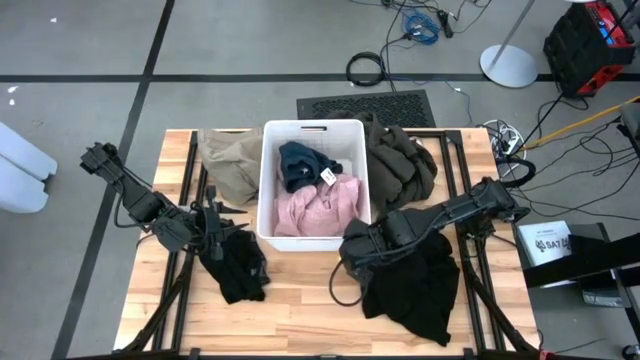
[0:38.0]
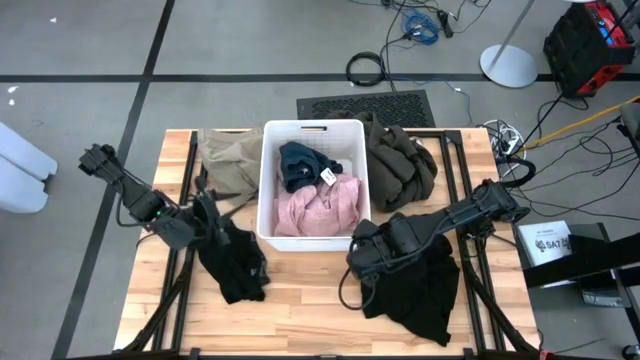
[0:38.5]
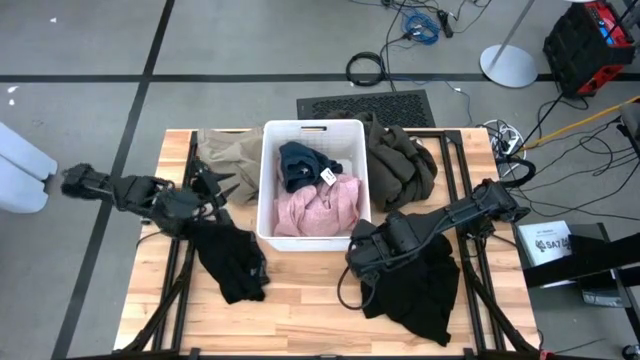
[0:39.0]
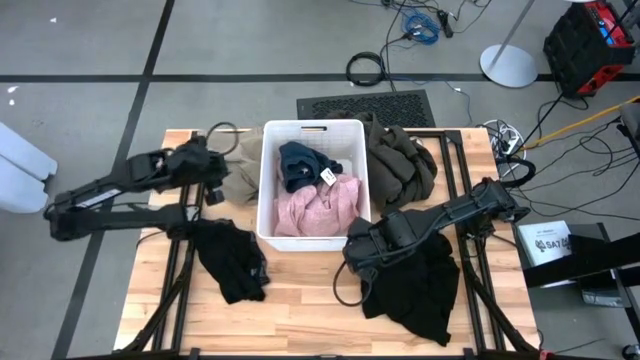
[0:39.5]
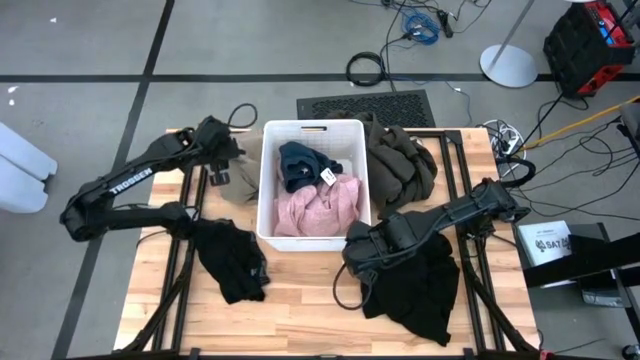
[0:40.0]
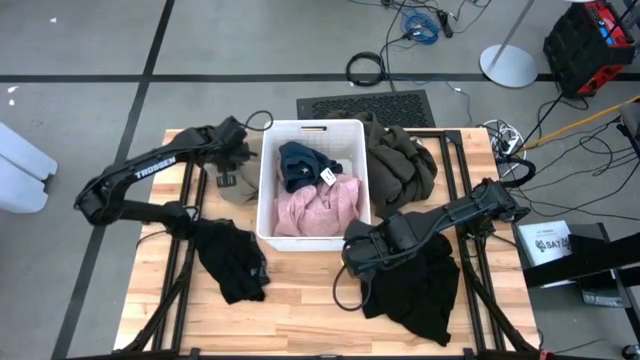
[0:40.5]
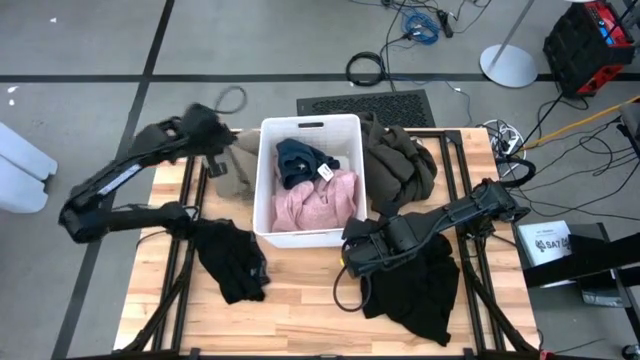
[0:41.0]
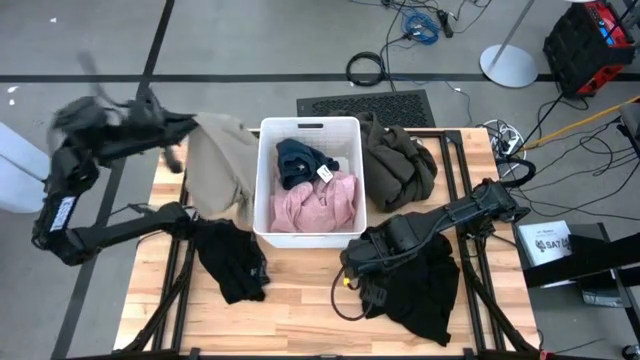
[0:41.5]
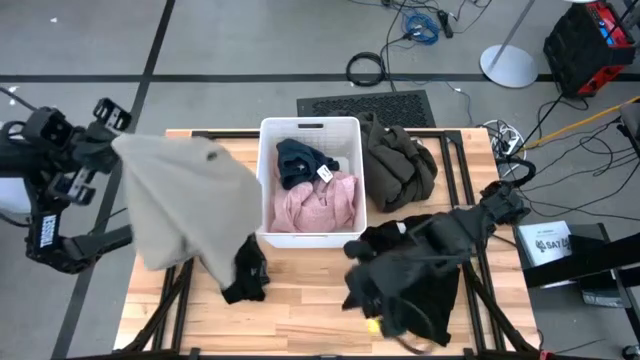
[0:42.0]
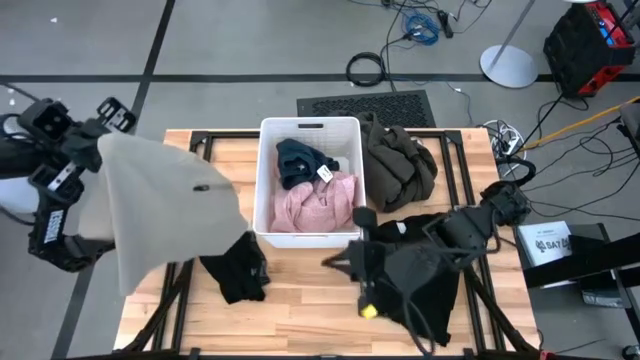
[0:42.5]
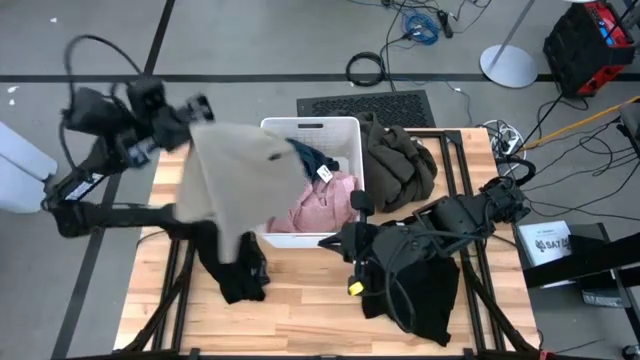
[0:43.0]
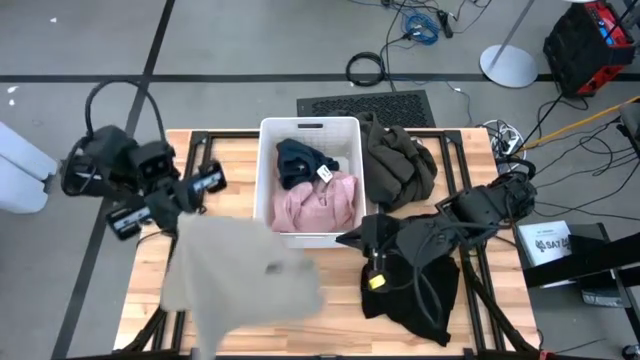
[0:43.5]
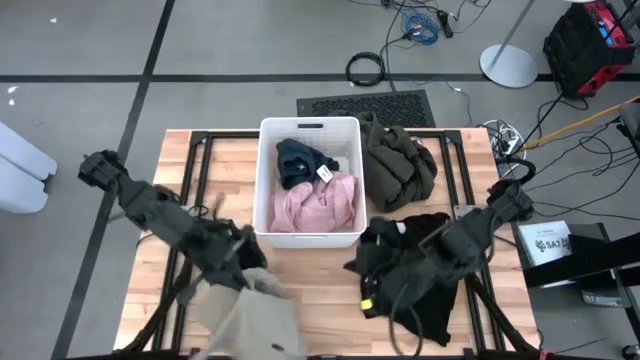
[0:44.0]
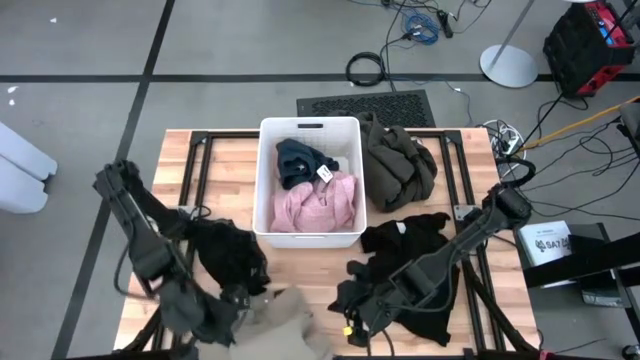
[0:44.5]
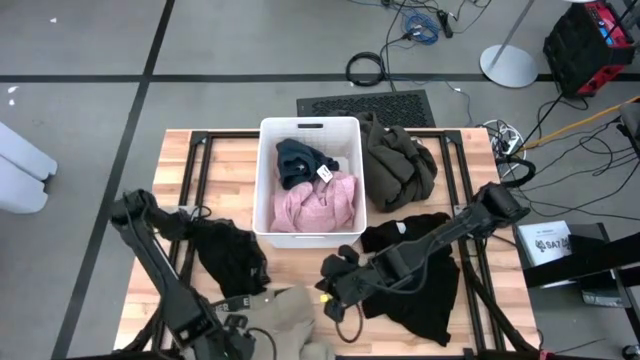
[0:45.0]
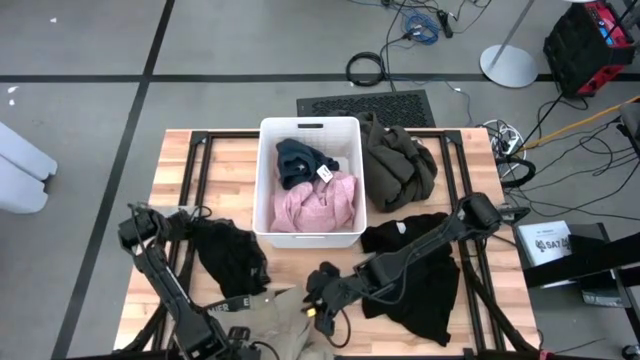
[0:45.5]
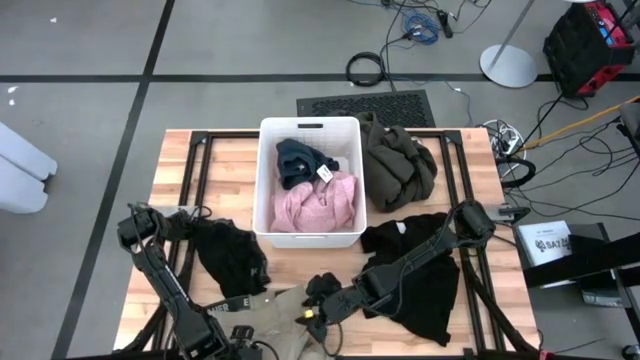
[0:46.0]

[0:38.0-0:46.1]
Task: Sort clothes
Put the brown shorts into the white laundry bin

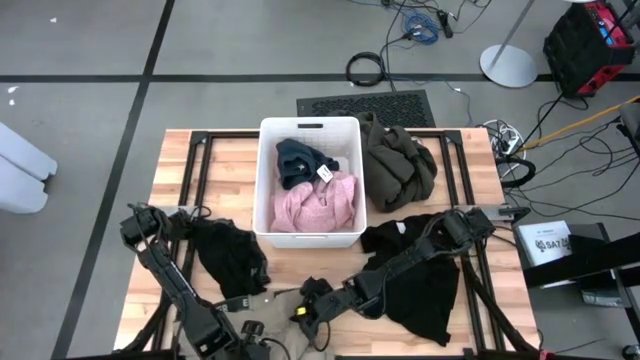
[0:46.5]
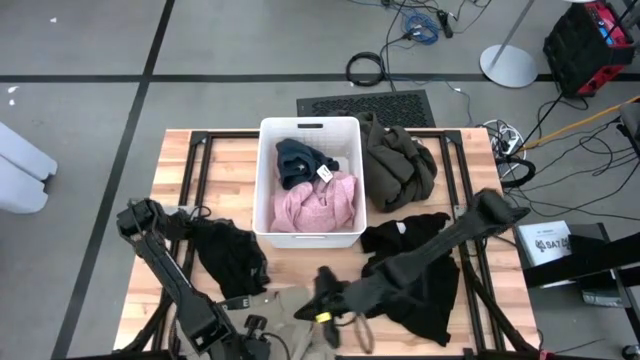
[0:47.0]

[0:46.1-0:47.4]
Put the brown shorts into the white laundry bin

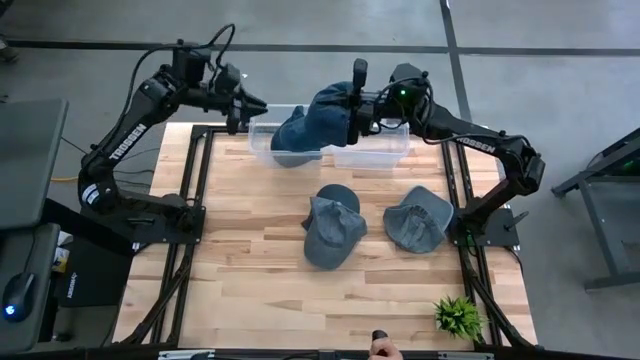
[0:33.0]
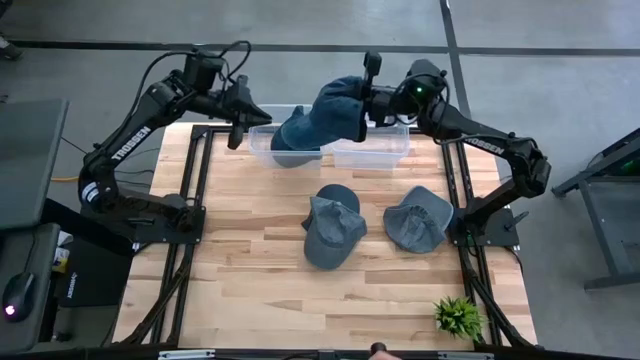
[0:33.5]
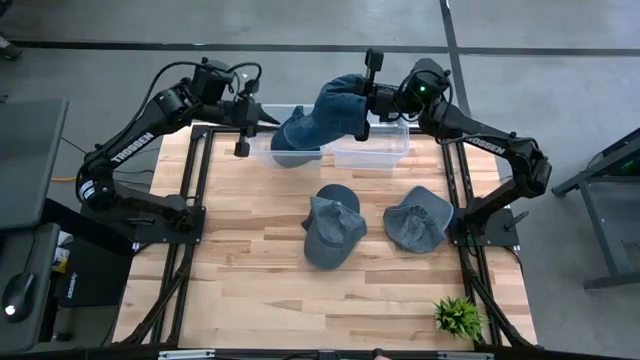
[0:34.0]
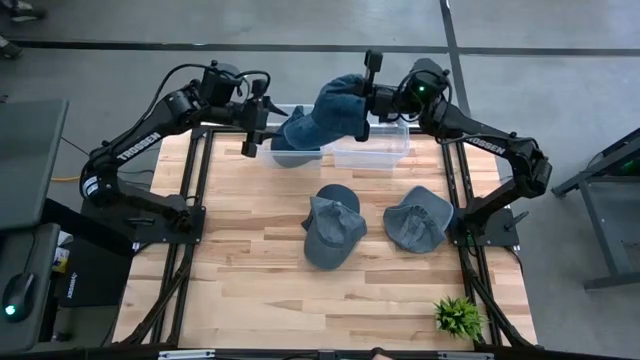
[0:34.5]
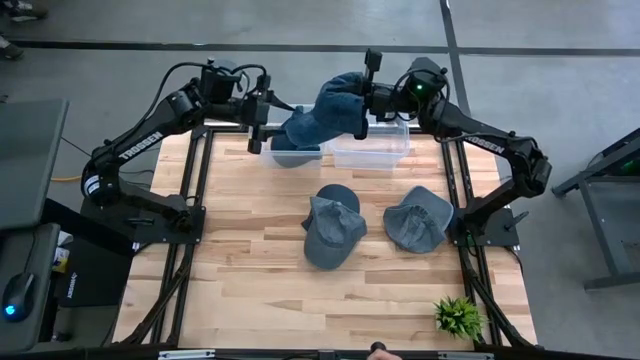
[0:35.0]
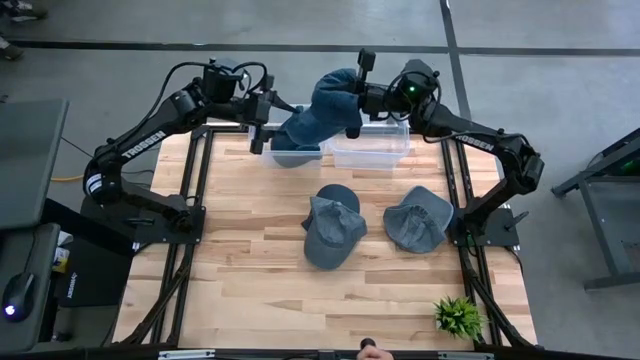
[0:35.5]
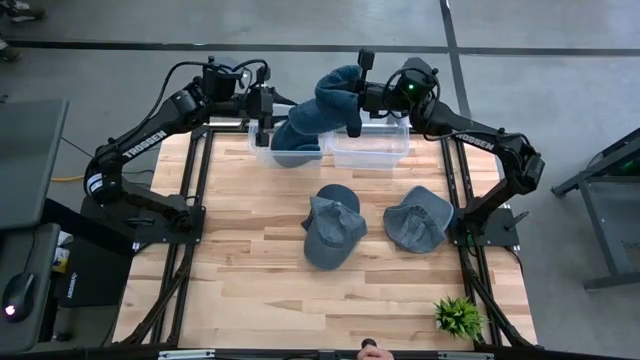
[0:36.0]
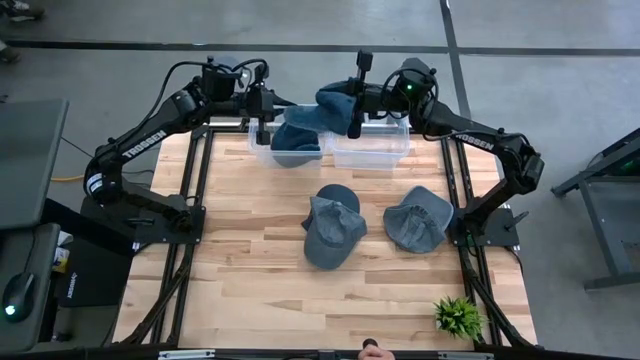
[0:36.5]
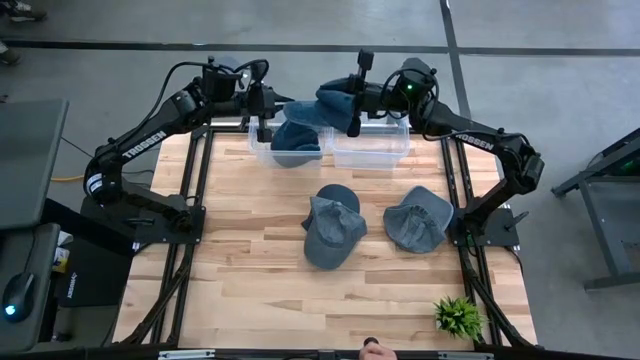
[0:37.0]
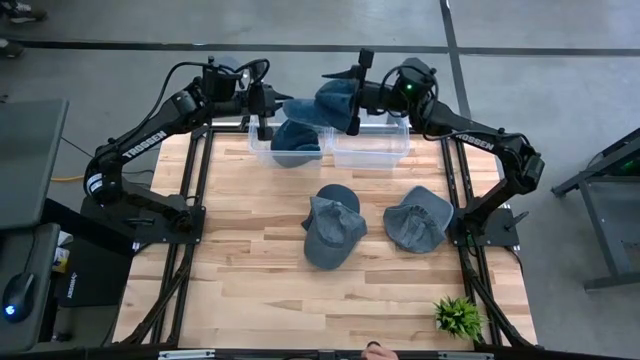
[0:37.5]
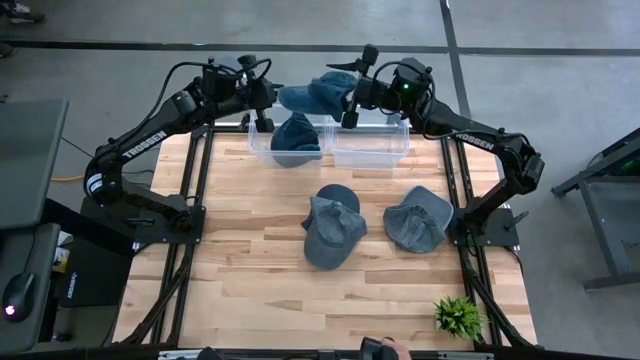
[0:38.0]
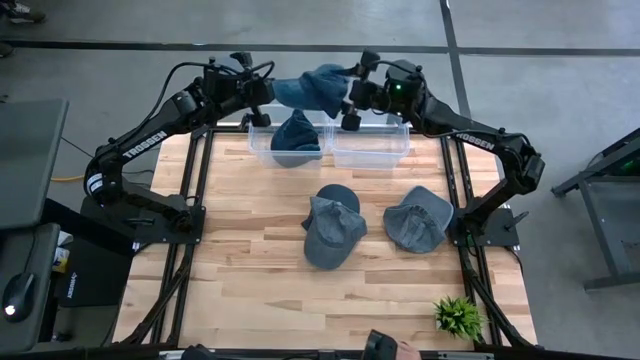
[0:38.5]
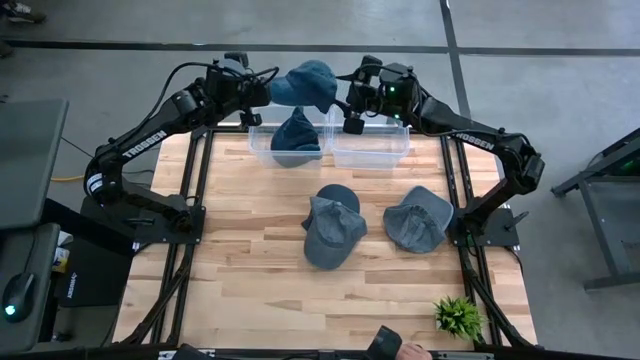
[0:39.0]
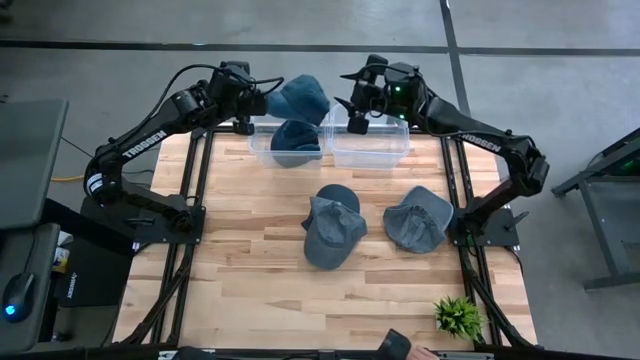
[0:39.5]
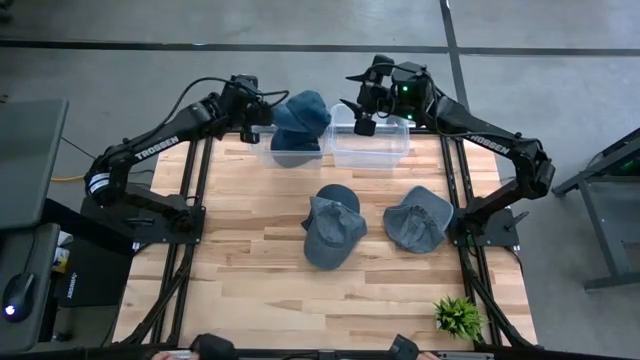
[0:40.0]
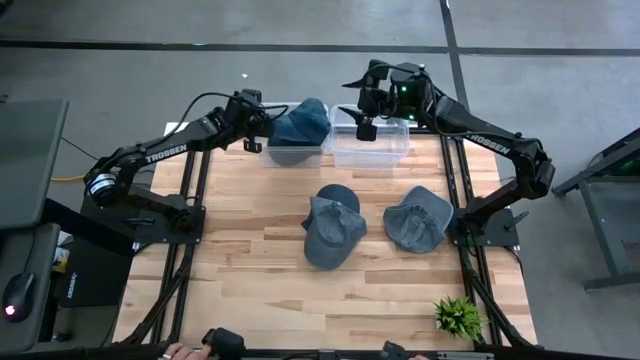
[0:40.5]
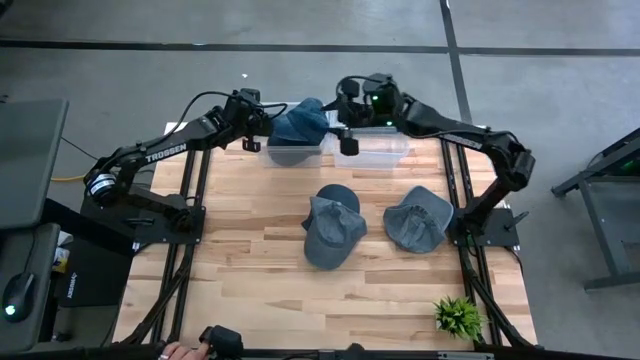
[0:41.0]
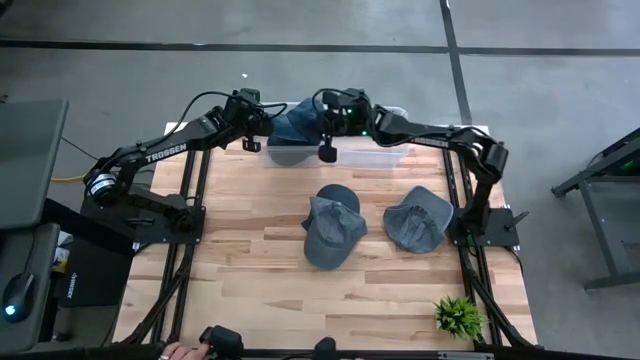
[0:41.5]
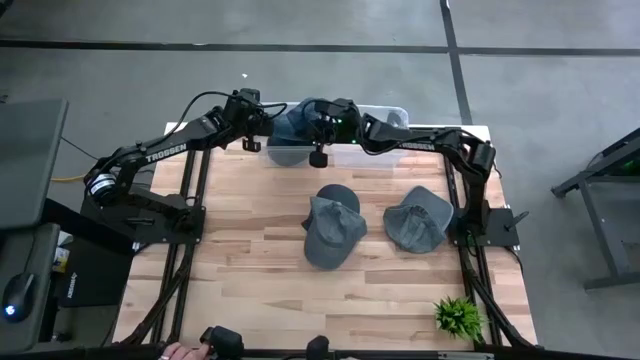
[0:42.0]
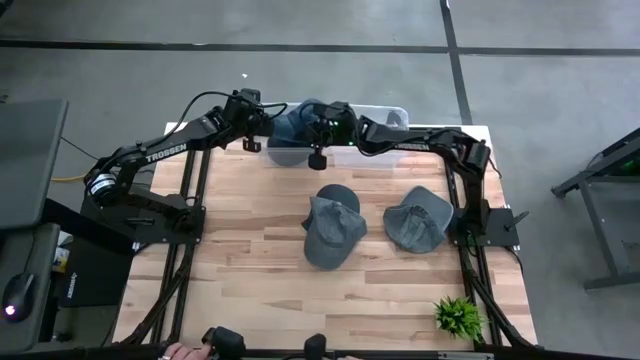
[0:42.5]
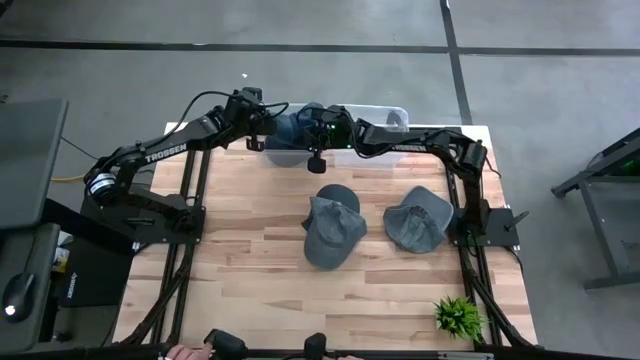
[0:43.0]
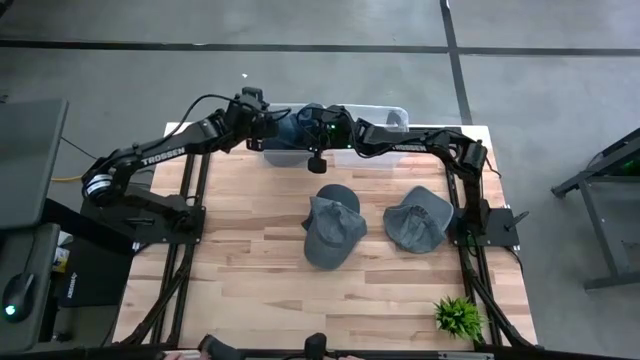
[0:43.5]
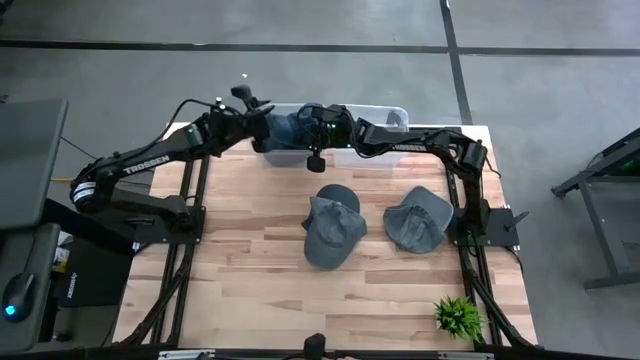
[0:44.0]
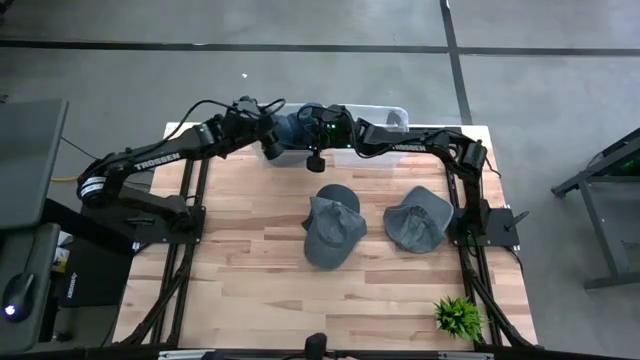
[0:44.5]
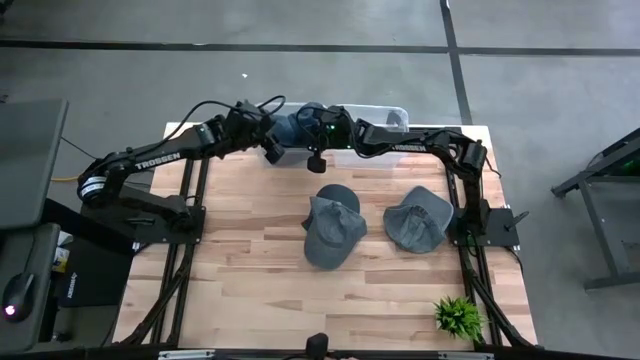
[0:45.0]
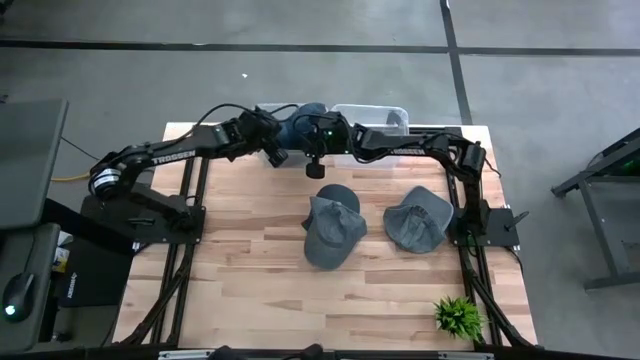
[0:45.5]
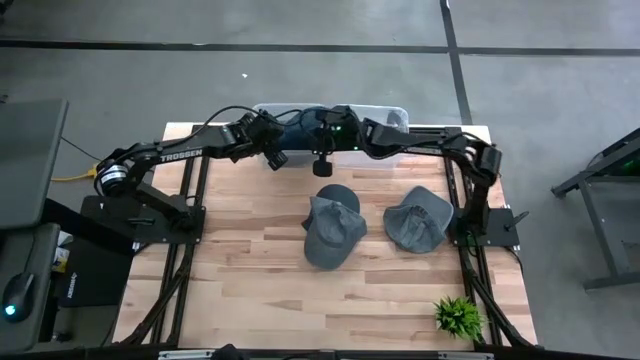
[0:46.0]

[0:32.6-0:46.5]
Task: Pick and place caps into container
Put the blue cap into the left transparent container
